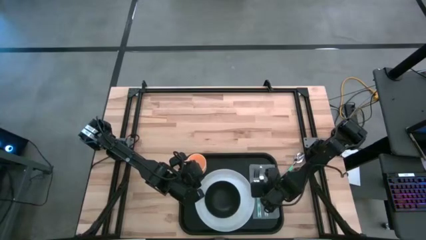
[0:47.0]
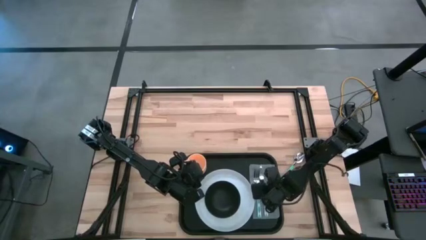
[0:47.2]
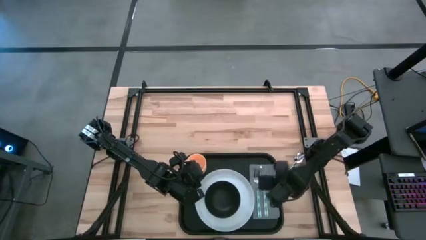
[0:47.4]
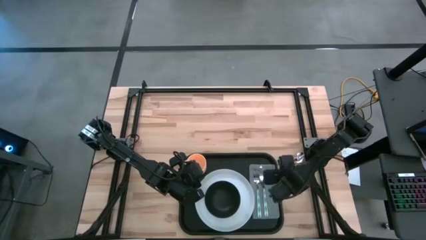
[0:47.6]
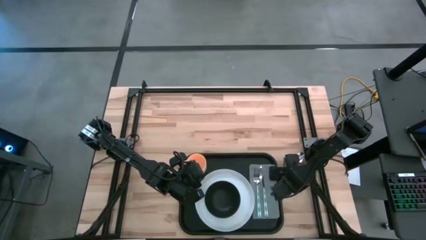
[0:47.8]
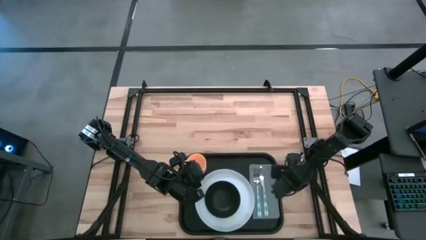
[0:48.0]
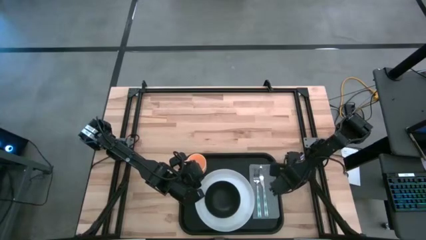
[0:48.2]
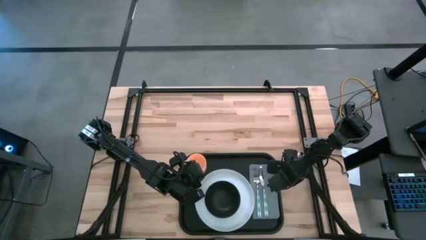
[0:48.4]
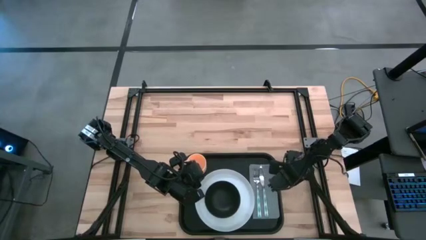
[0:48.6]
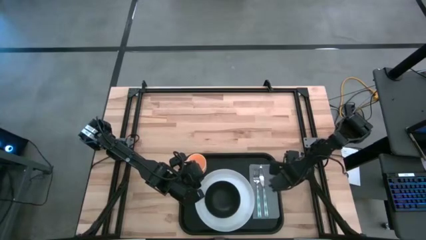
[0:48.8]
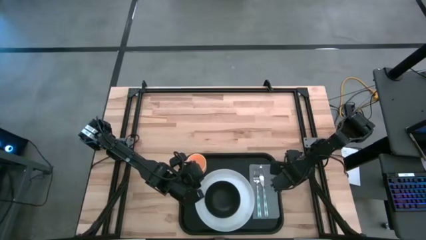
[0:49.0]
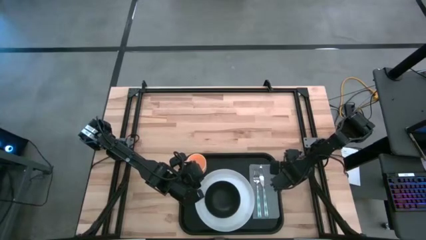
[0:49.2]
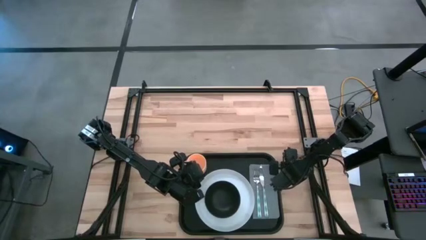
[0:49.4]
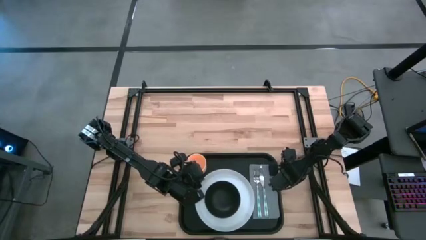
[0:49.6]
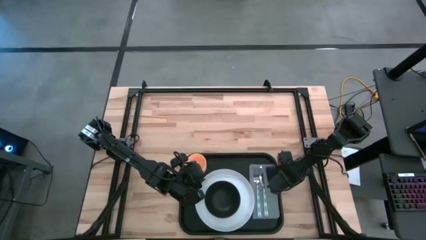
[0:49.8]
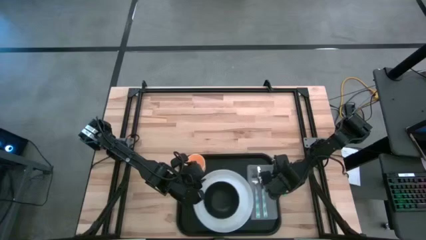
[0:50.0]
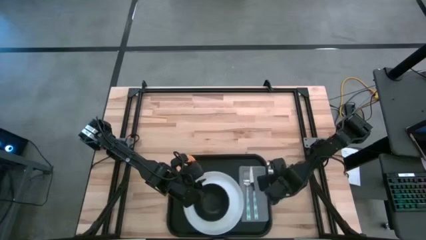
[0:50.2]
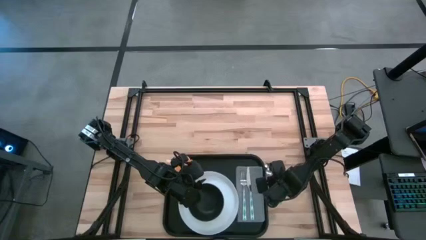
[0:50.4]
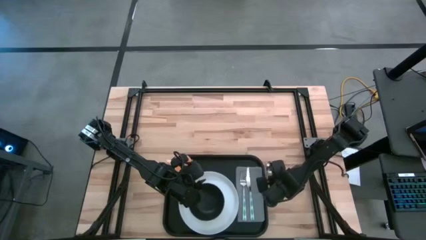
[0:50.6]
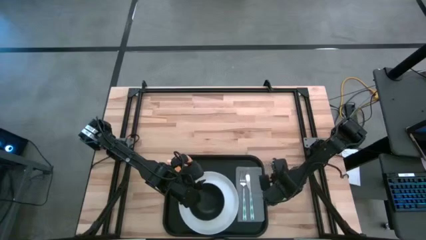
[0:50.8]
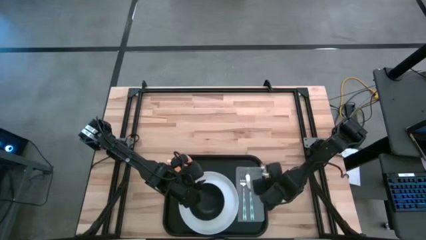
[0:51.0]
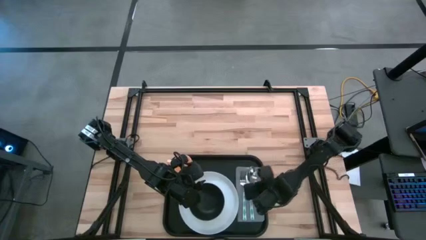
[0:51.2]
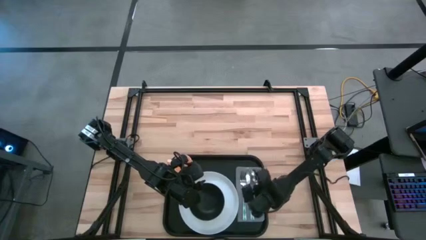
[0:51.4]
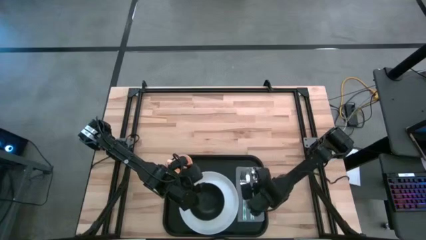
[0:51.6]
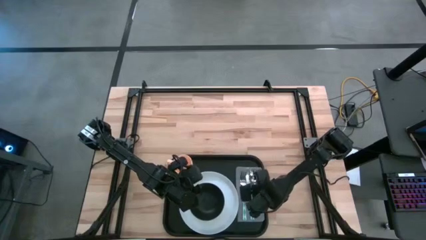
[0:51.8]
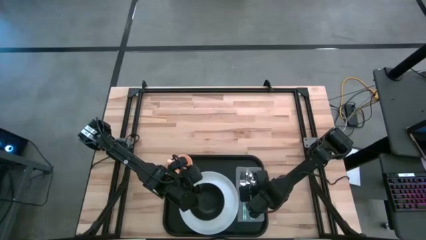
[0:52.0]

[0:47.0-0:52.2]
Task: Set up tray
Put the green spoon beside the green knife on the gray napkin

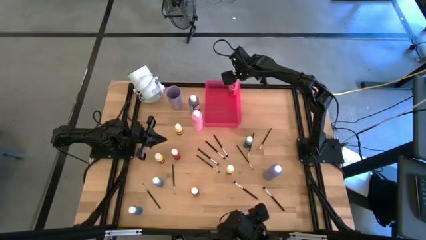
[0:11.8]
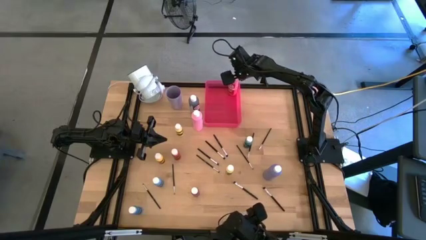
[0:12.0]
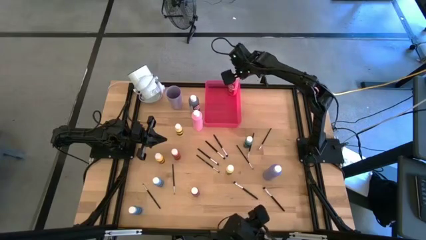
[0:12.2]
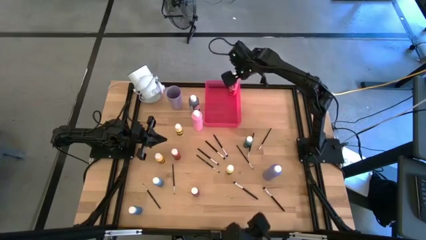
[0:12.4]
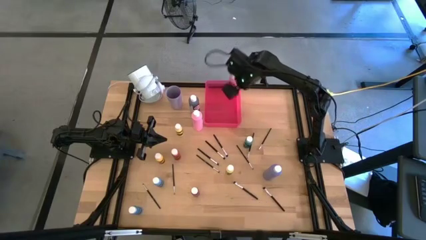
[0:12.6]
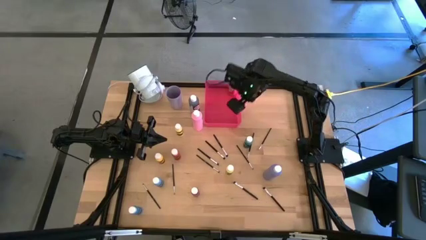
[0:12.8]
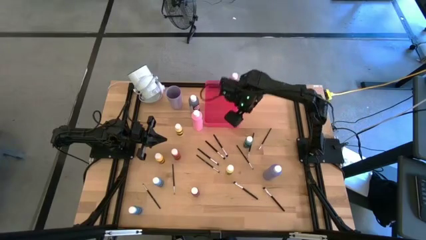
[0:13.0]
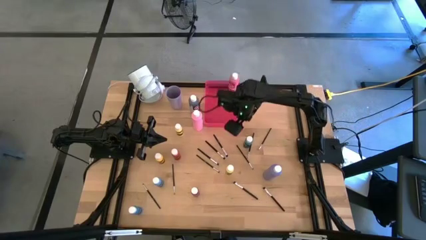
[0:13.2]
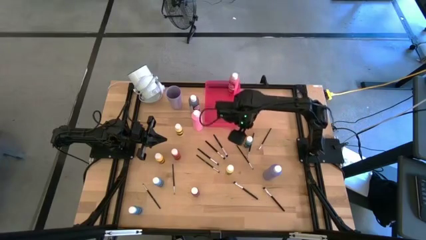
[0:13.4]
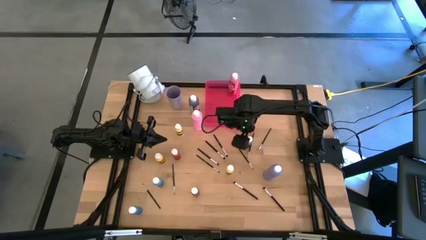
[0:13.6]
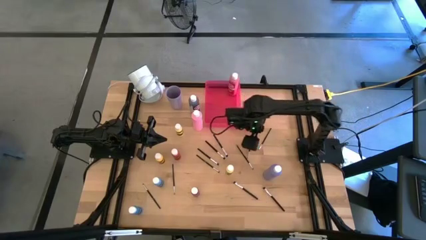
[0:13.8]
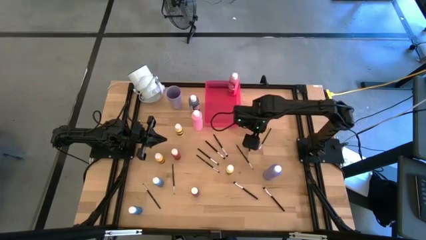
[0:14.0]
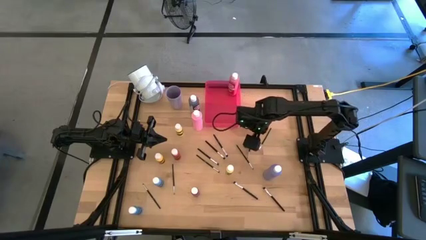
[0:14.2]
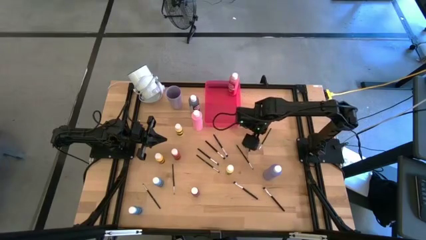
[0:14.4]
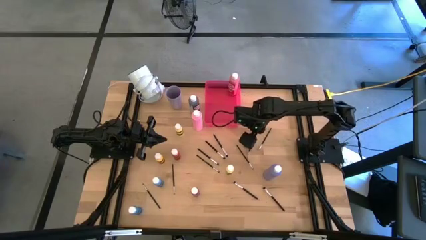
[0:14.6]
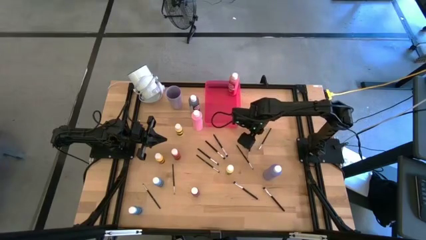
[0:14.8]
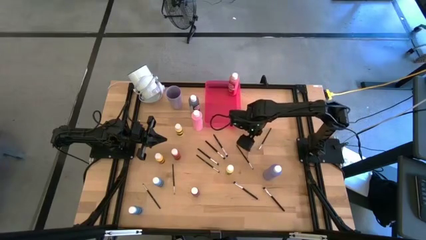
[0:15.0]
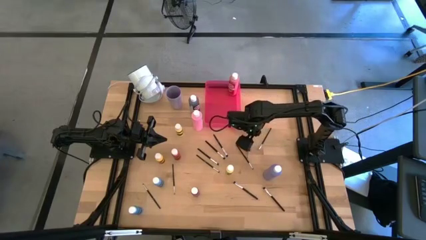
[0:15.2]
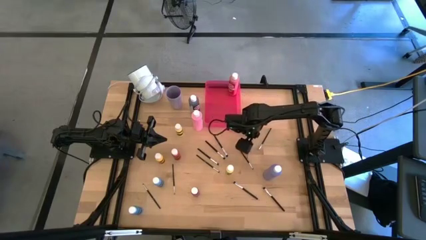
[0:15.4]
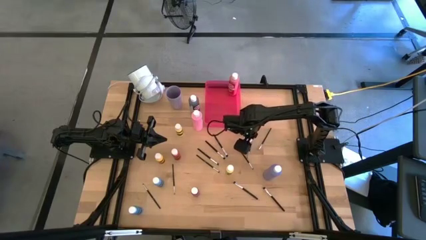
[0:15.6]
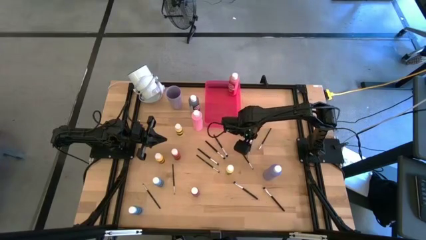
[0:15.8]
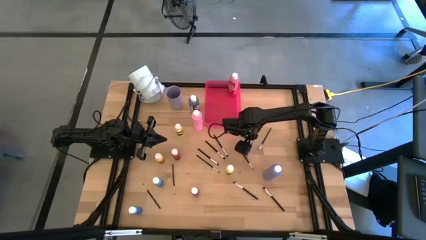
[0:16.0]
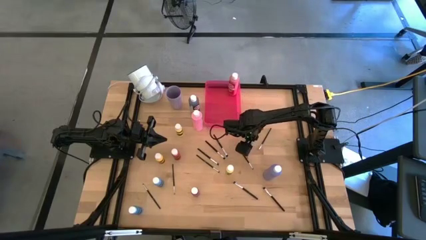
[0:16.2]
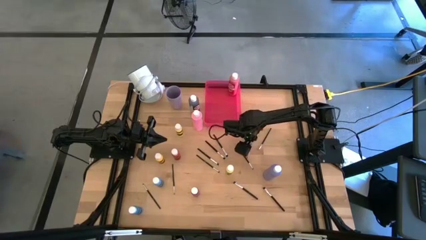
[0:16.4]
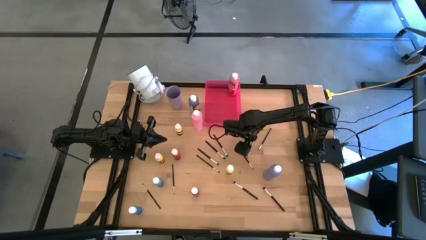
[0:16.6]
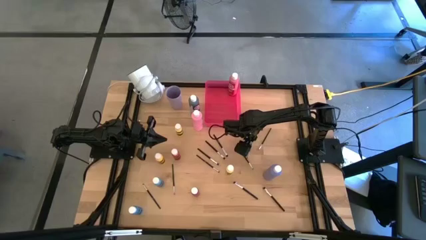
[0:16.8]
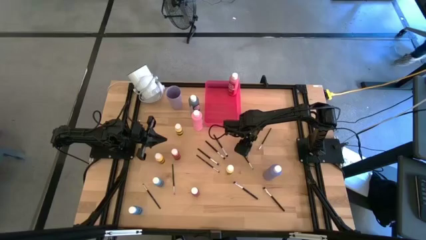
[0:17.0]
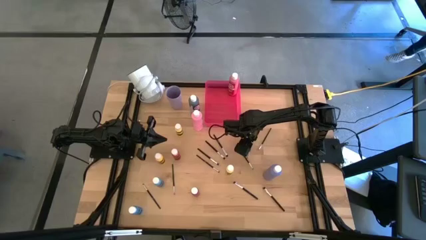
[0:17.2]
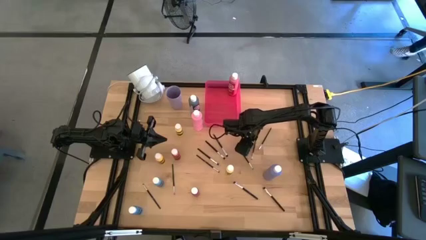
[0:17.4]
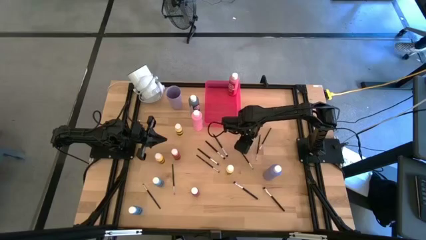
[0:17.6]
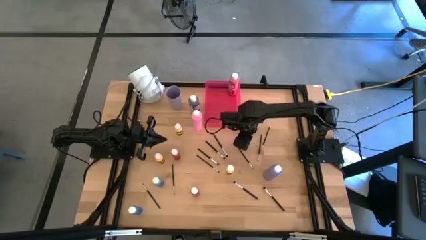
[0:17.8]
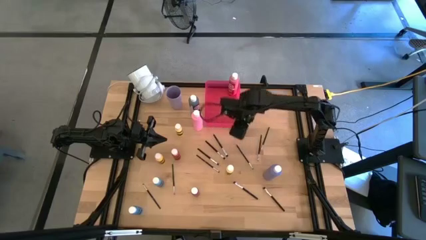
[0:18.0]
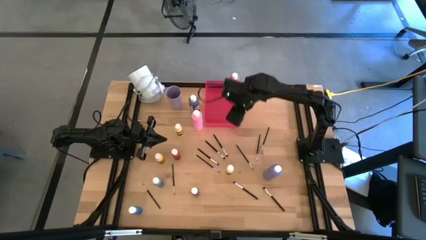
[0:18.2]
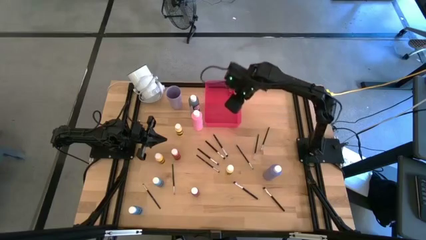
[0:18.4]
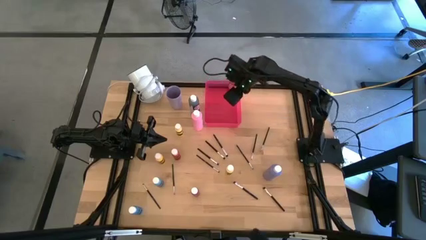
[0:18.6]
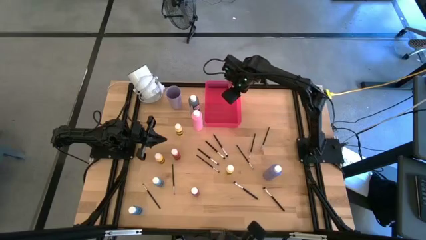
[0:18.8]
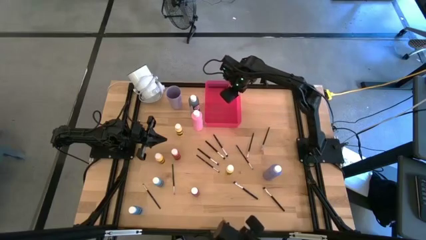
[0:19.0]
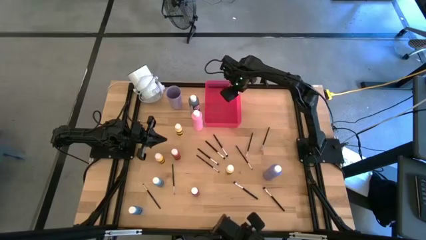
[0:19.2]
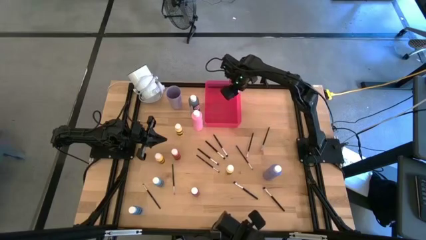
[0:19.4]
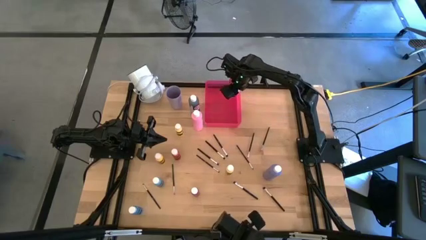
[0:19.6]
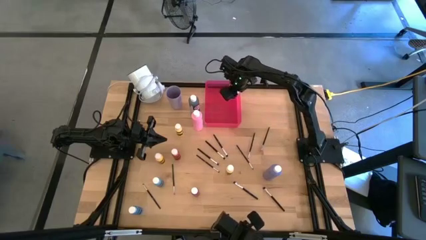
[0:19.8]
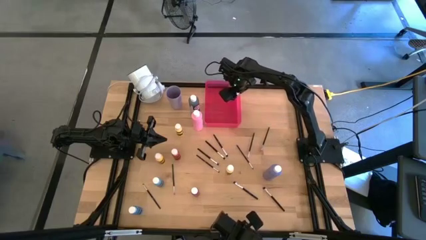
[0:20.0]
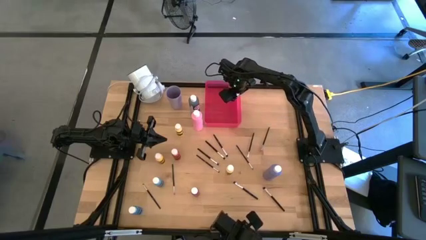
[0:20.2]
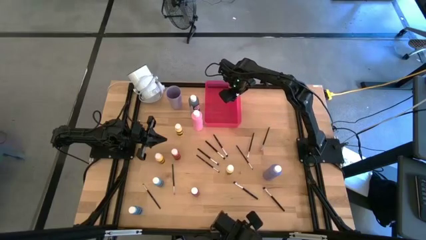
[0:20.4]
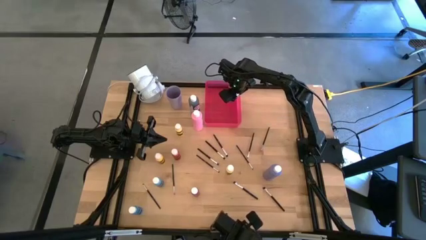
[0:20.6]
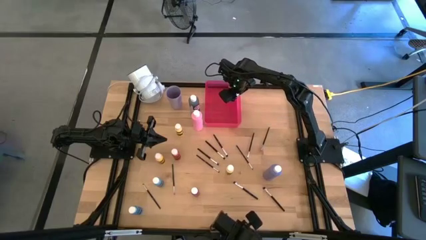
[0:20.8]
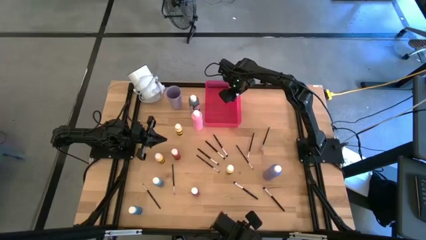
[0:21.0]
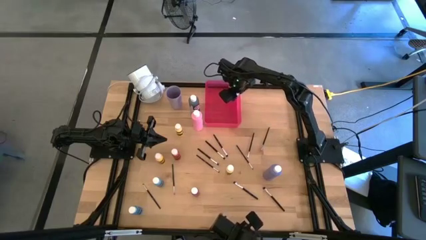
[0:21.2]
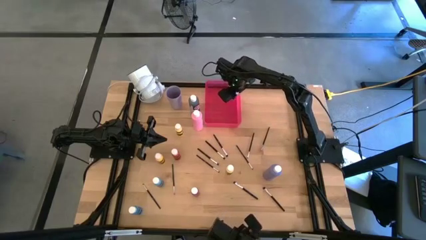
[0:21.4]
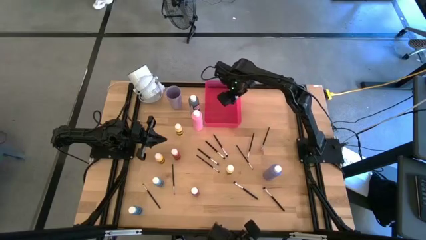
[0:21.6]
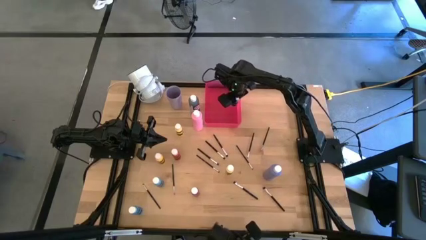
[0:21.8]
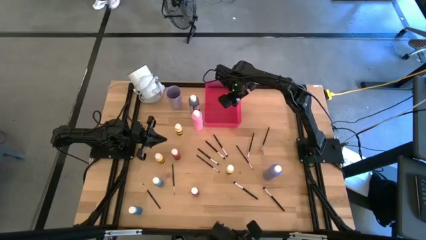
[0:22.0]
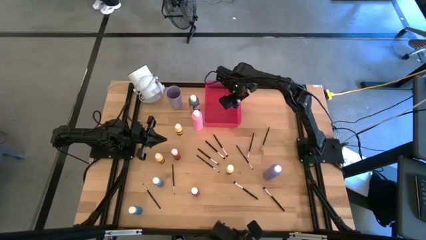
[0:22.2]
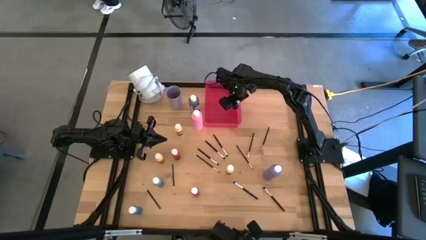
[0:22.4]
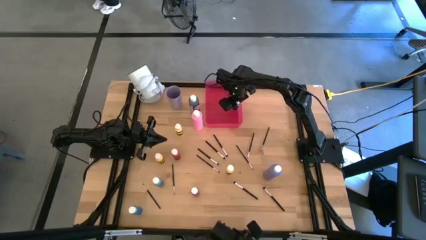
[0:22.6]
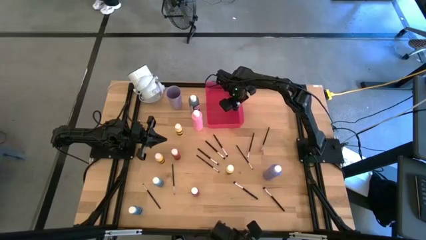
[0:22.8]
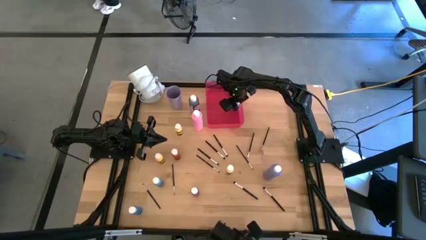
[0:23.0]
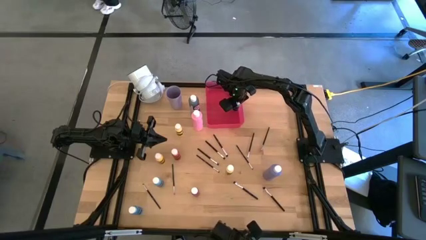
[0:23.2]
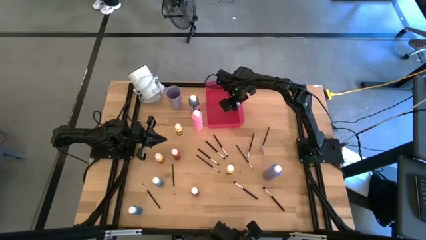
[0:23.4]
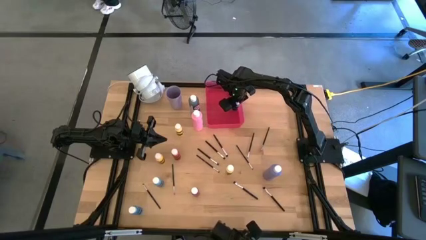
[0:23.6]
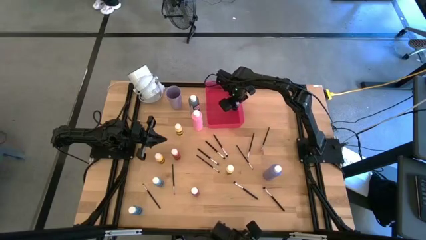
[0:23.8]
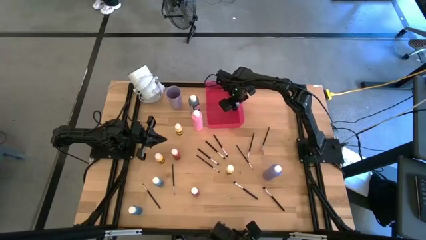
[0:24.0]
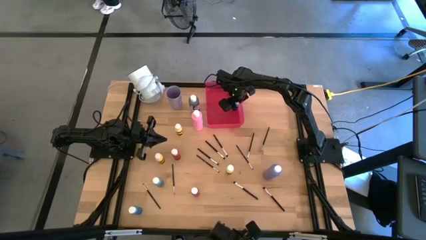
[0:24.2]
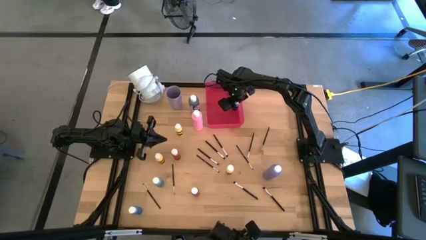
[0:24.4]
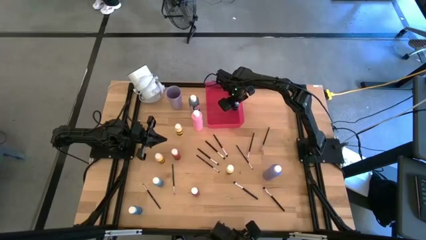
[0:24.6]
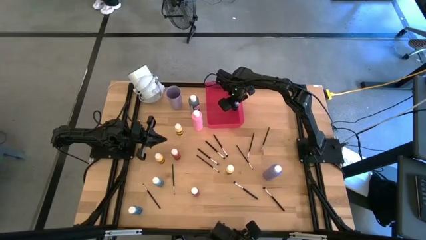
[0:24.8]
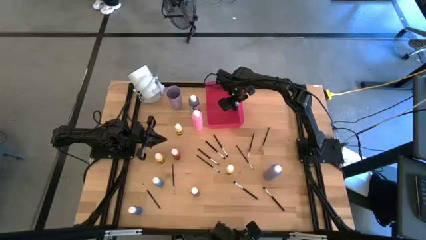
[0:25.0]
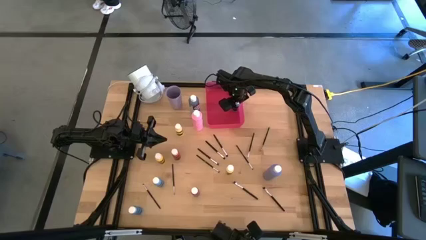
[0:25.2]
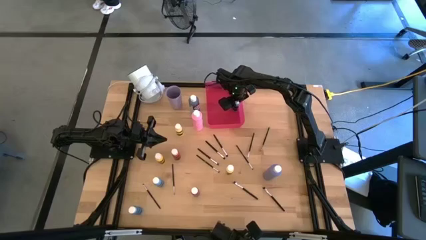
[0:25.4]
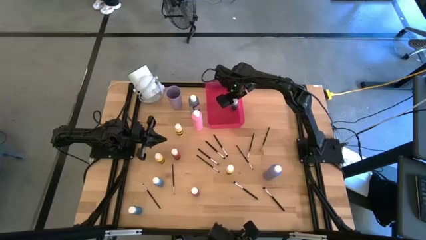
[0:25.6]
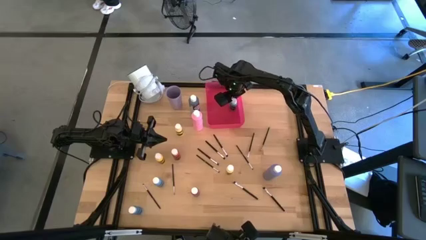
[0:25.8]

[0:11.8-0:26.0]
Task: Pick & Place Paint Supplies
Put the green paint bottle into the red bin
